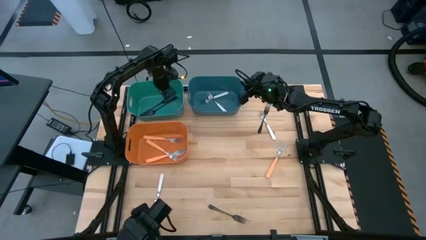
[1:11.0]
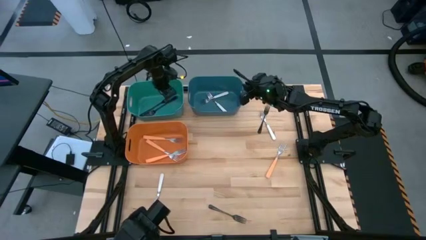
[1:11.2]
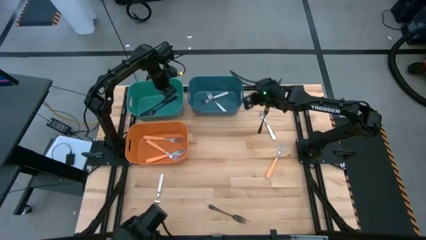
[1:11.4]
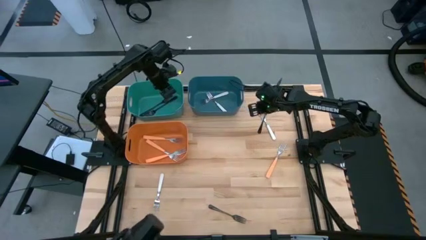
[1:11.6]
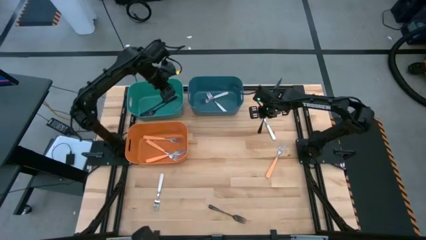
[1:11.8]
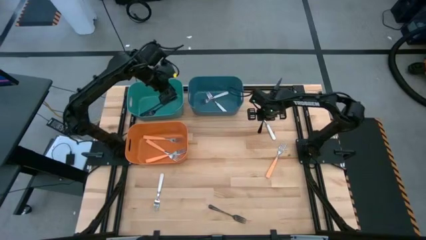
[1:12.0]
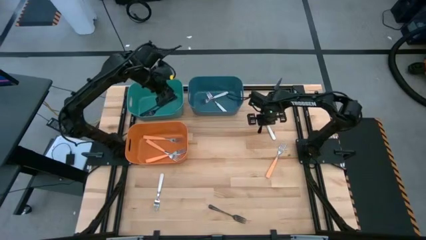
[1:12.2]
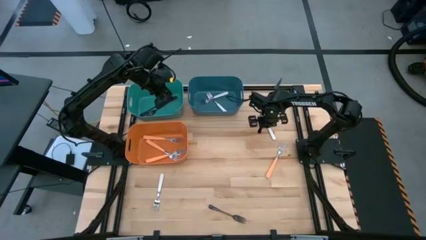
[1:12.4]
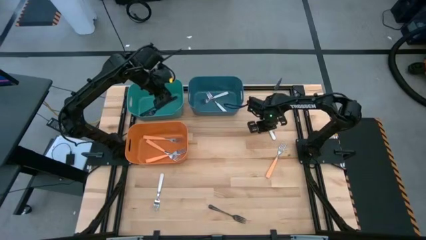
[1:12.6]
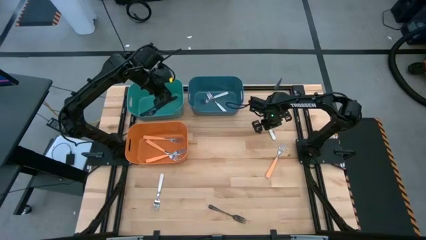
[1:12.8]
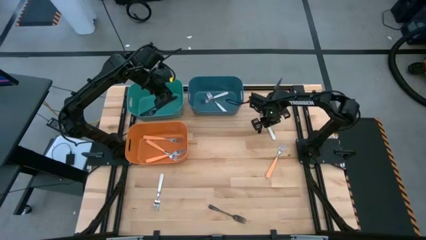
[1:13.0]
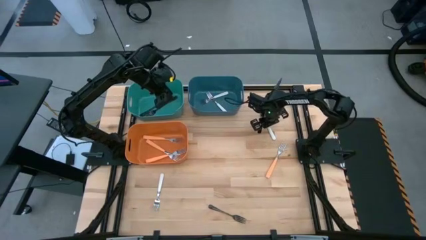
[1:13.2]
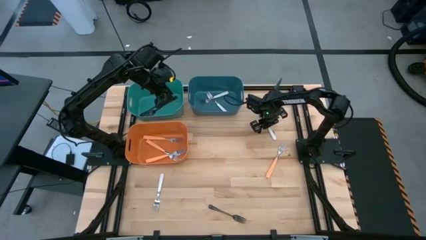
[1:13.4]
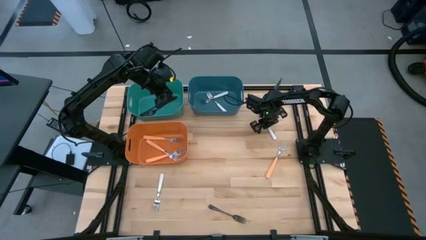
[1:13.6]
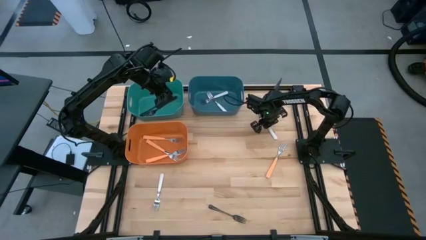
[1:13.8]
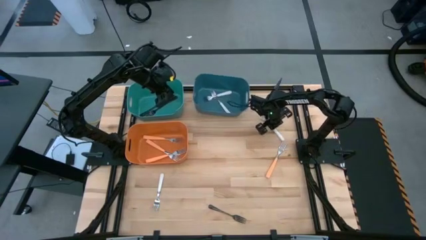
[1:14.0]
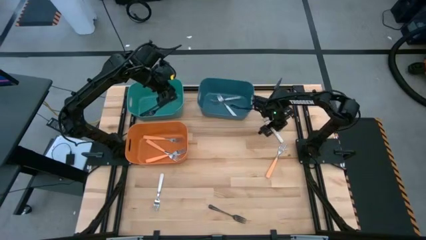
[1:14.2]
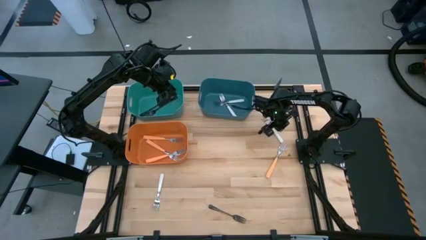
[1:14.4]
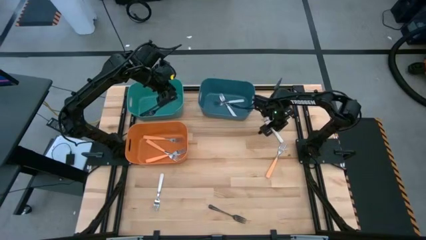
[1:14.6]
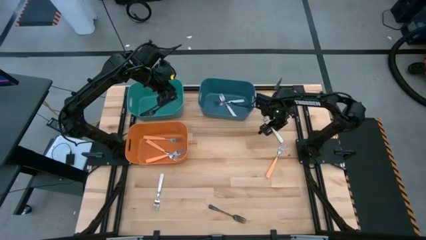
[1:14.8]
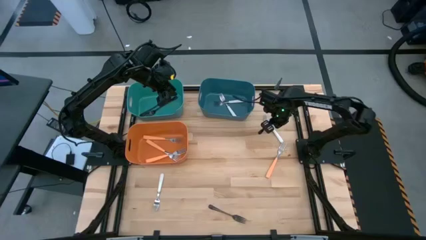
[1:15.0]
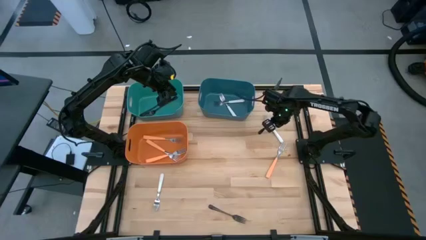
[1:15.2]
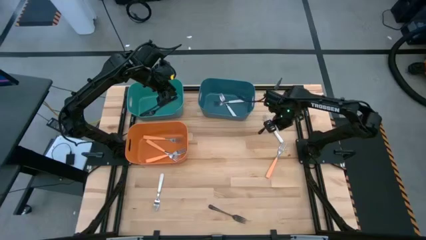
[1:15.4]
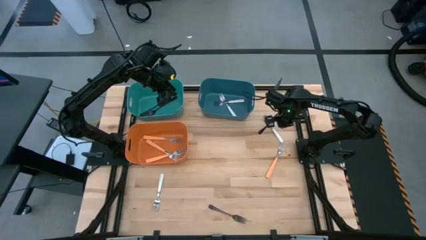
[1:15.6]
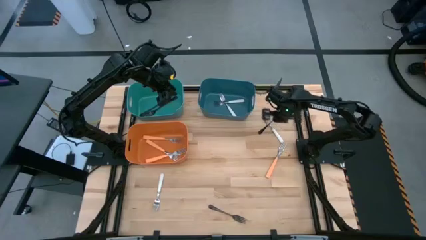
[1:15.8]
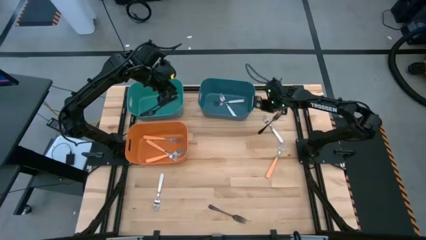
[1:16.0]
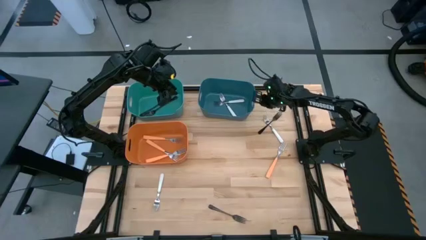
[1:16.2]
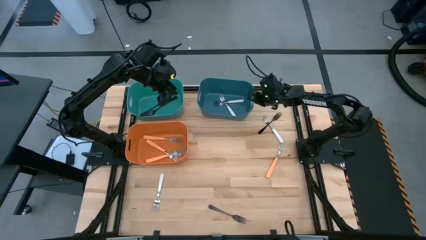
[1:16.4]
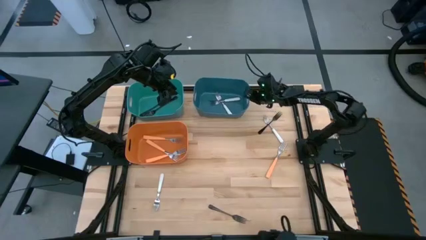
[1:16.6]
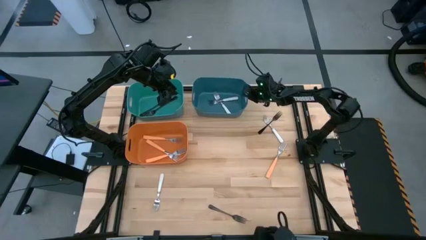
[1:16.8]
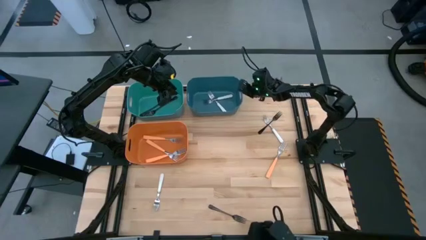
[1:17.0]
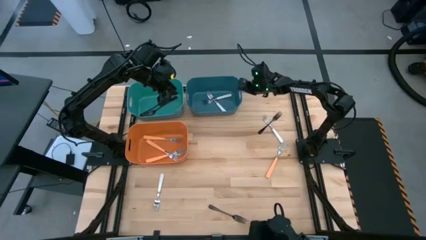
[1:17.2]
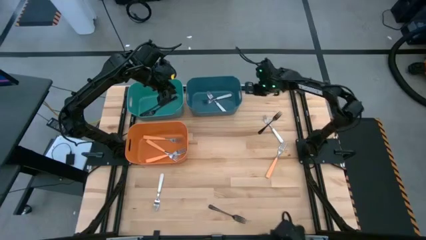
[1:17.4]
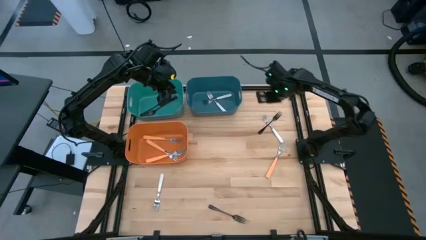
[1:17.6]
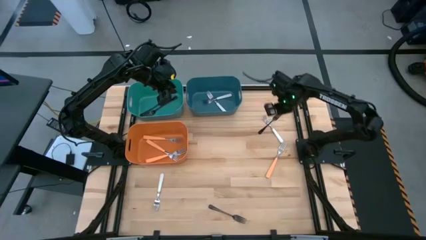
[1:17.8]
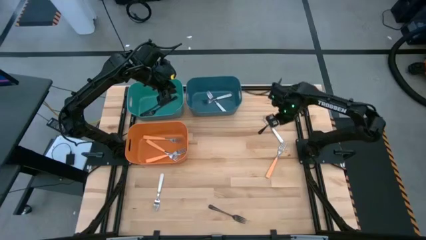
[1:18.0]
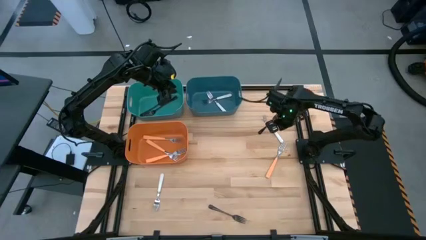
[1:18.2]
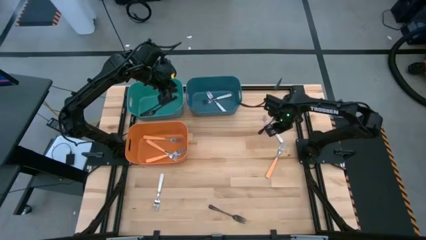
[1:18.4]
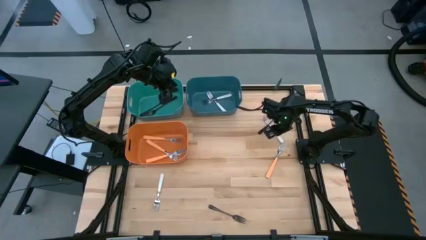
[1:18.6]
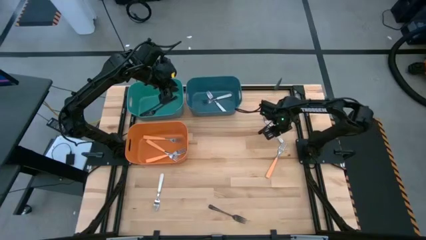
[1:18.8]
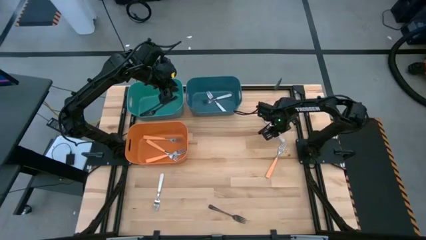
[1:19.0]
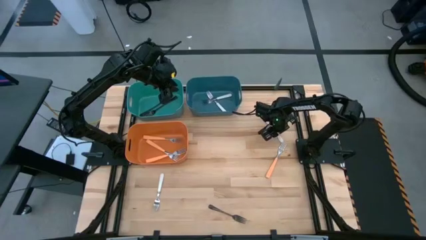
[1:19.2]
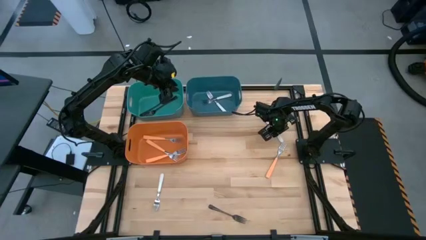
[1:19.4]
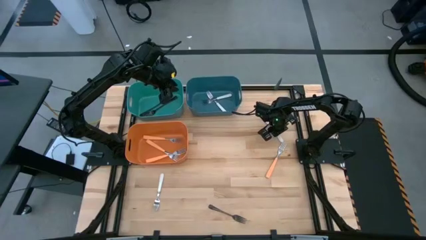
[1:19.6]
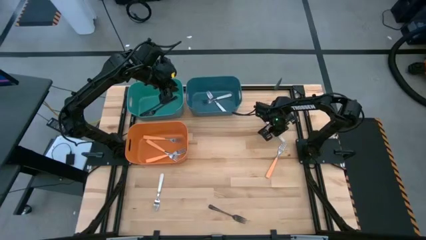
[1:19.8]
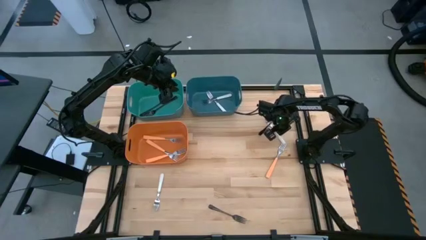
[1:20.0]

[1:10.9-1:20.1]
Task: Sort silverware by color (type)
Put the white fork into the blue bin

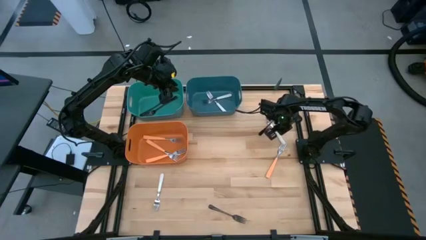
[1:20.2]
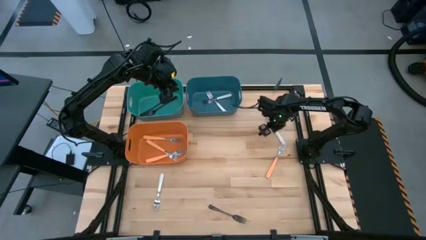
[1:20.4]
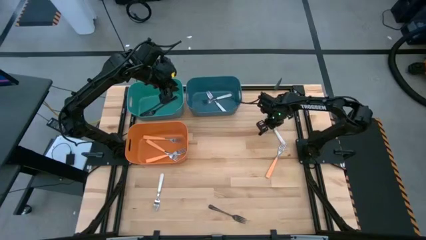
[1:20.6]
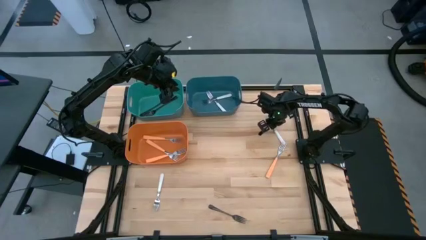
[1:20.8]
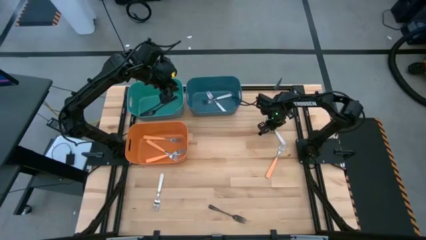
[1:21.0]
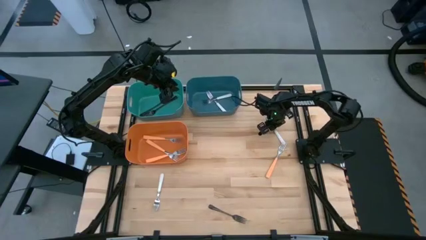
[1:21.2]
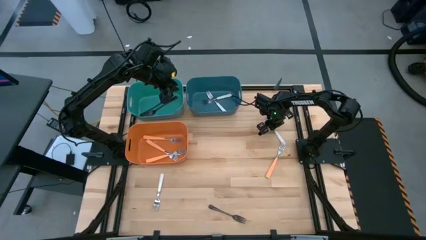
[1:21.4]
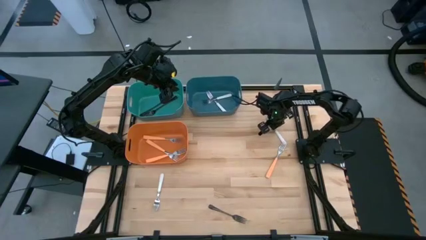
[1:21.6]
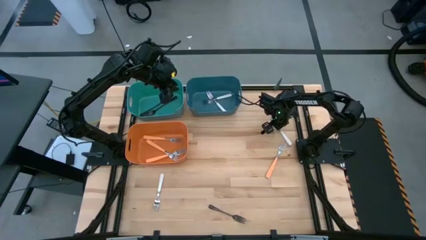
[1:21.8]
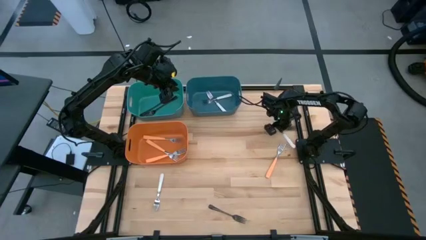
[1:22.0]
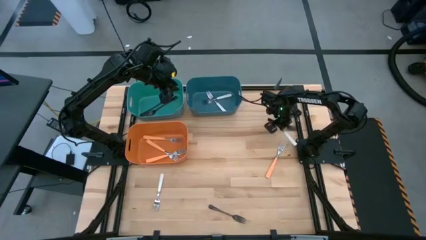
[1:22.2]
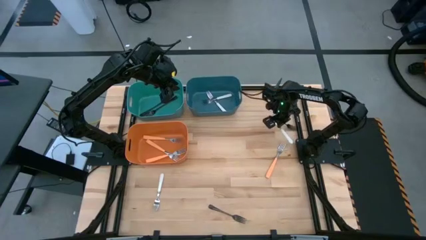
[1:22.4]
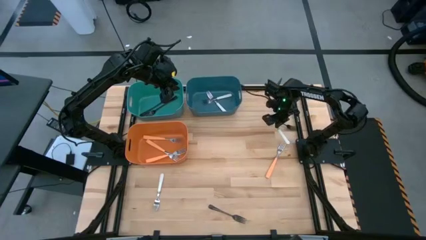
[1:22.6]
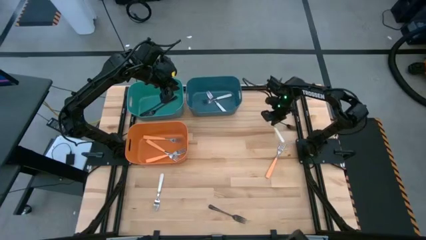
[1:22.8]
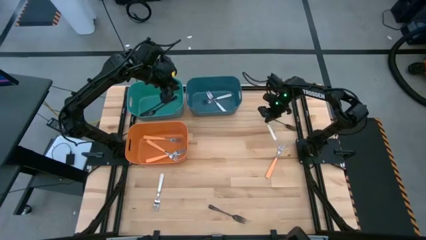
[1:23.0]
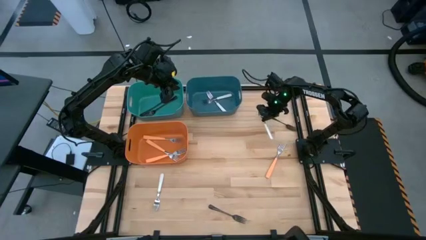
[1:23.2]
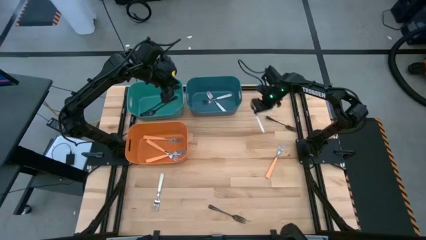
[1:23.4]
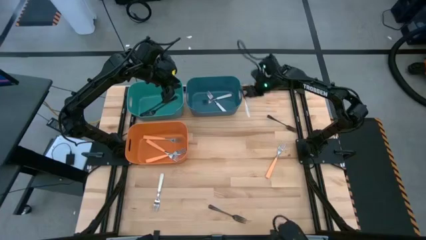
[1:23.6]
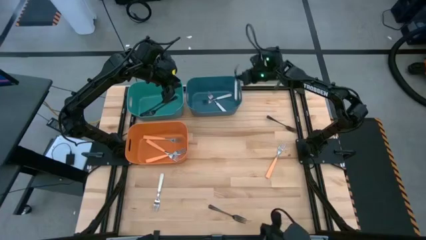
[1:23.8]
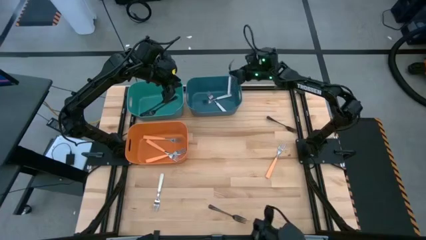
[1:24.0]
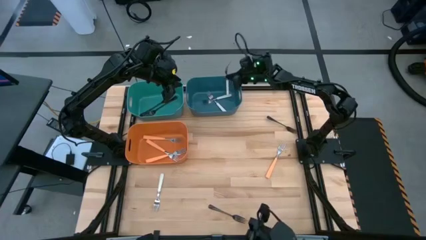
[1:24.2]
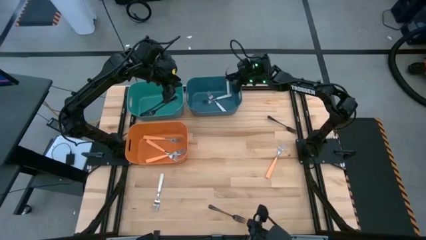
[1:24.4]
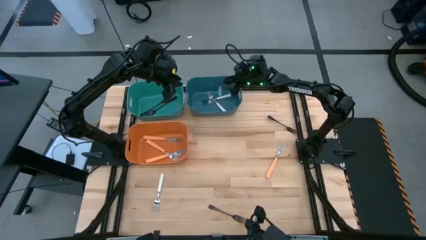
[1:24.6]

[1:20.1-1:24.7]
Put the top white fork into the blue bin

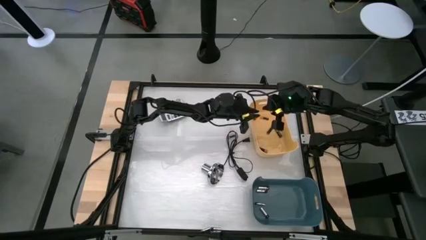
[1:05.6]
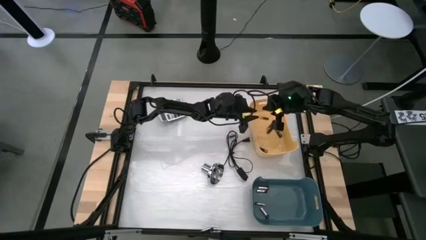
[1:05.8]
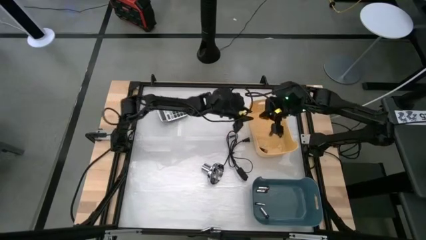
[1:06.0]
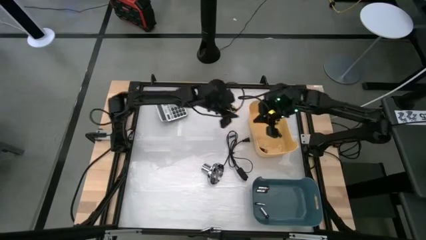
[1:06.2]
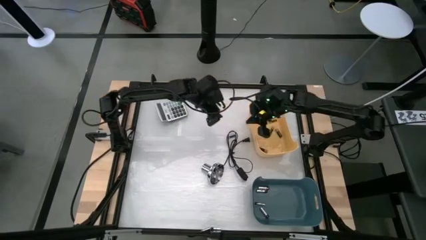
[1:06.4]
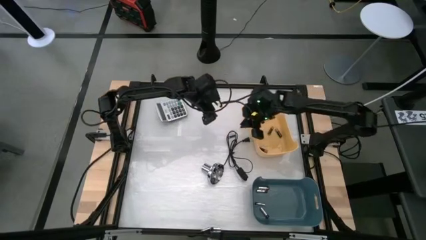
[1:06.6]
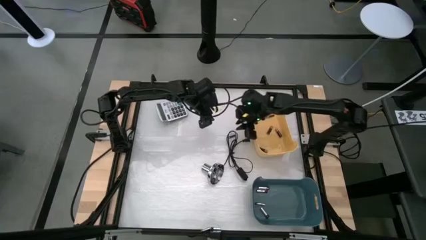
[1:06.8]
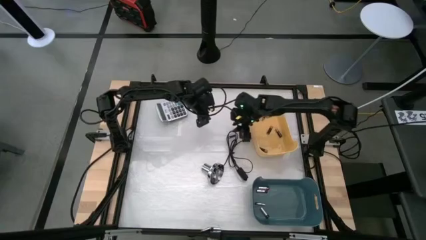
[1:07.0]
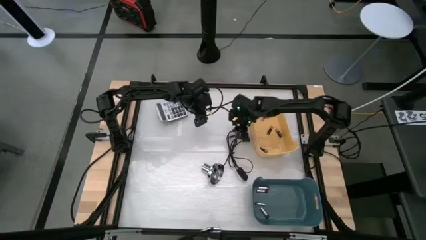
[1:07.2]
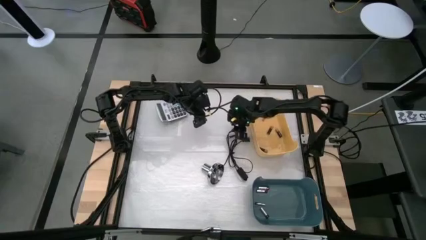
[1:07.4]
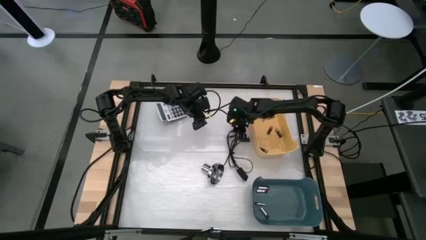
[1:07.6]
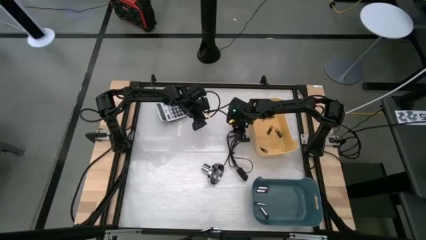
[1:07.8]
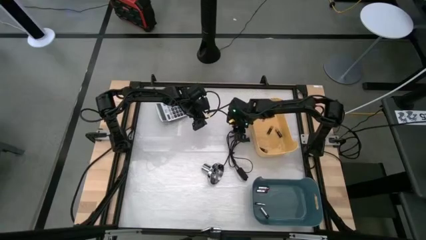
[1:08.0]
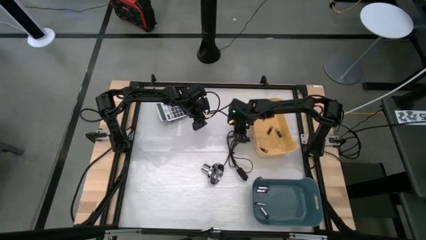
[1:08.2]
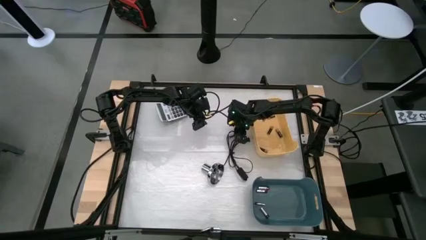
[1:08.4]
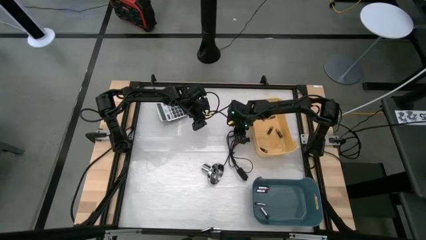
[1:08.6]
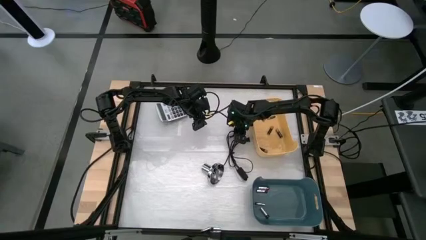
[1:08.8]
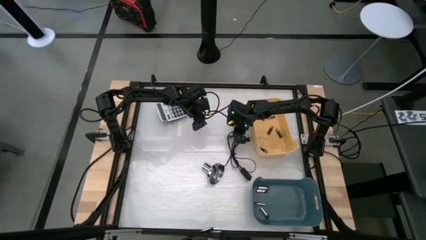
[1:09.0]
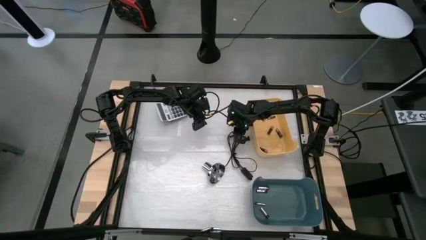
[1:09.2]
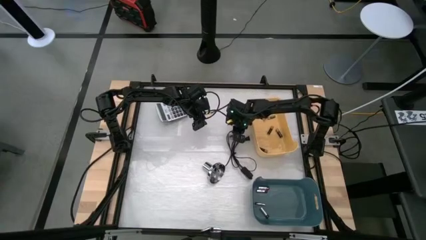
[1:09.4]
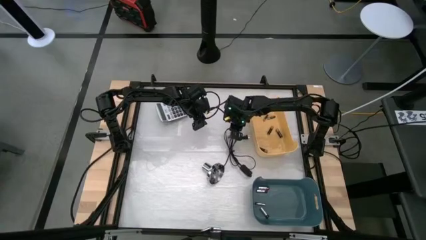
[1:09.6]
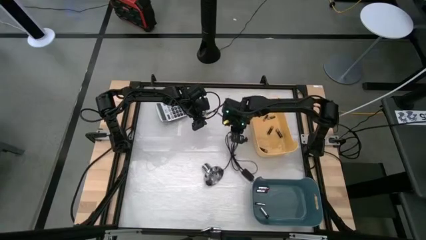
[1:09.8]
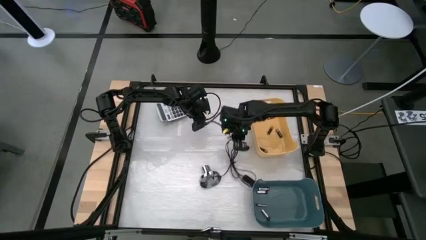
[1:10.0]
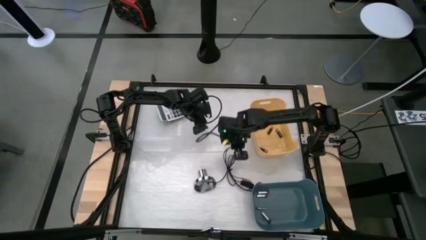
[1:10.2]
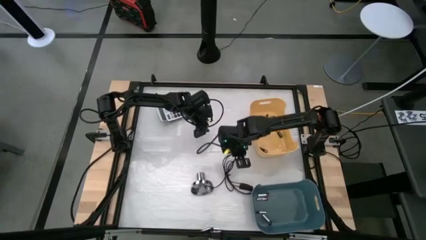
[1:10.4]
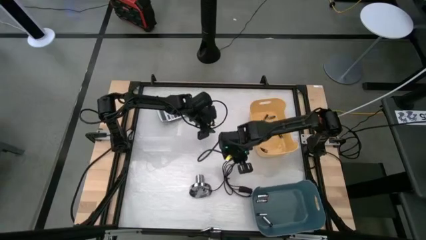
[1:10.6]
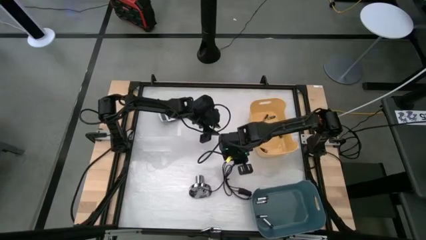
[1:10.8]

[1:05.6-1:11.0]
Task: Sort batteries
Move the lamp
